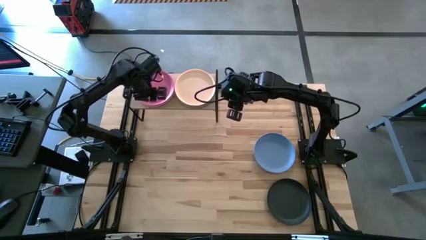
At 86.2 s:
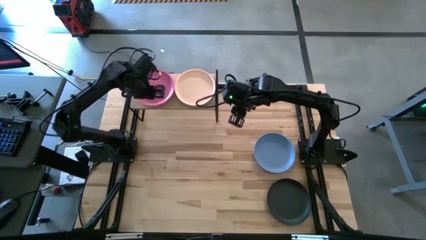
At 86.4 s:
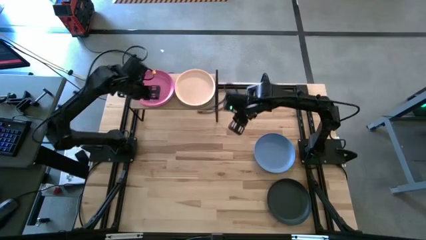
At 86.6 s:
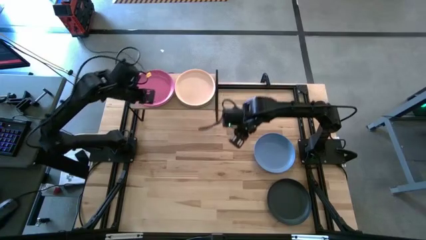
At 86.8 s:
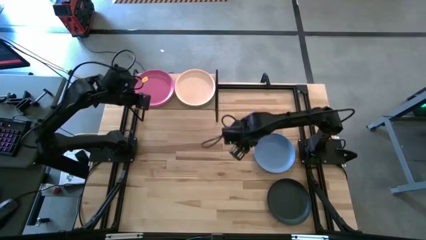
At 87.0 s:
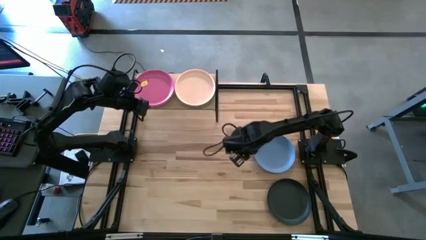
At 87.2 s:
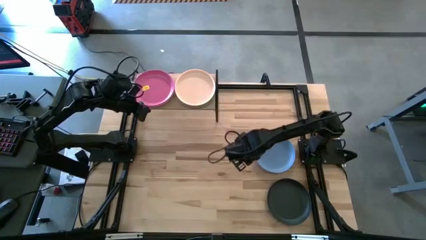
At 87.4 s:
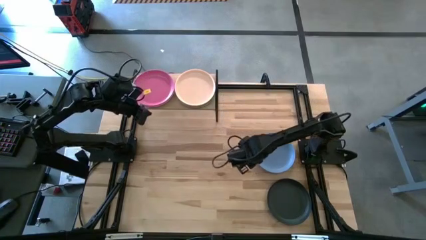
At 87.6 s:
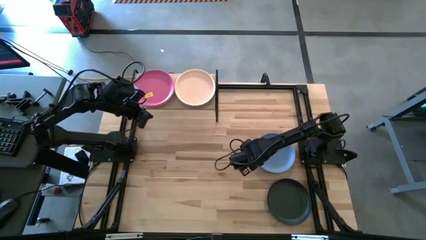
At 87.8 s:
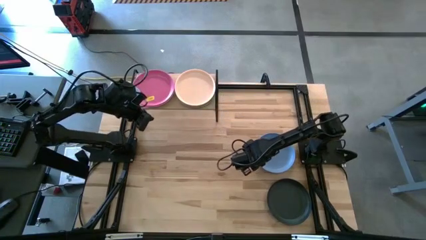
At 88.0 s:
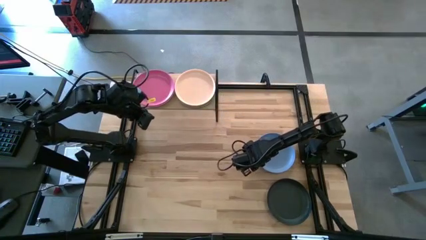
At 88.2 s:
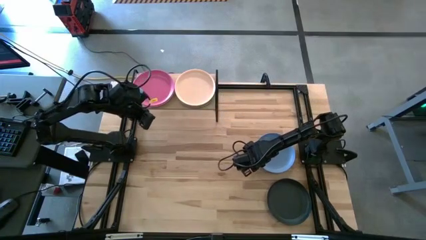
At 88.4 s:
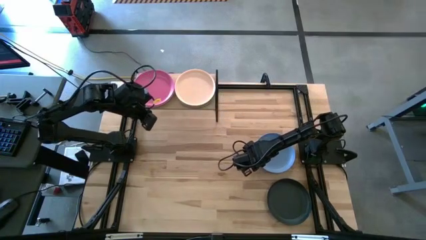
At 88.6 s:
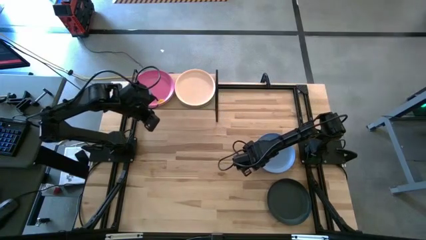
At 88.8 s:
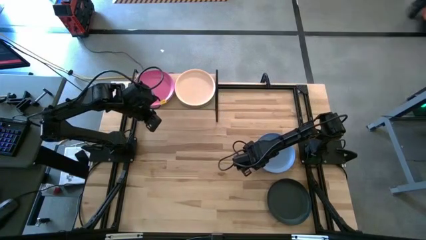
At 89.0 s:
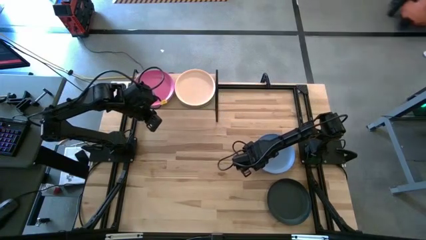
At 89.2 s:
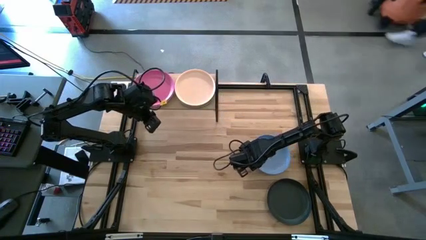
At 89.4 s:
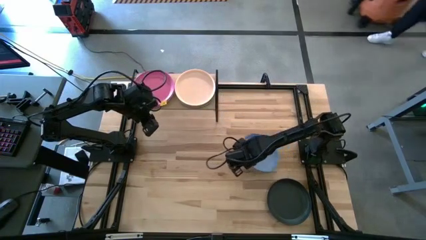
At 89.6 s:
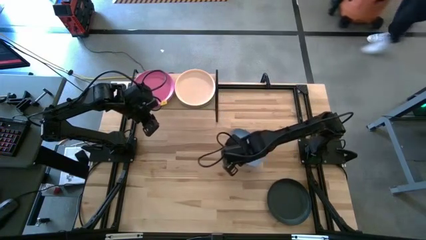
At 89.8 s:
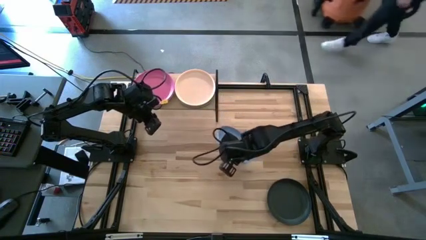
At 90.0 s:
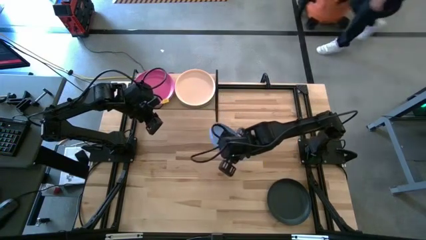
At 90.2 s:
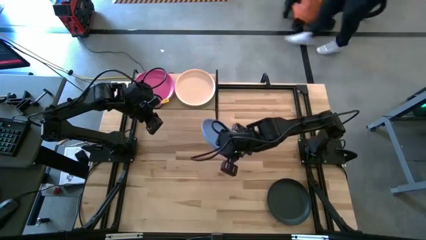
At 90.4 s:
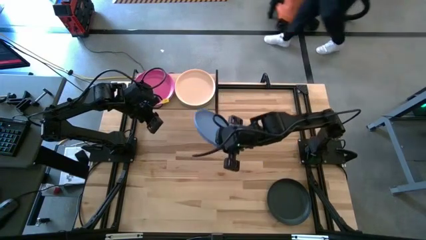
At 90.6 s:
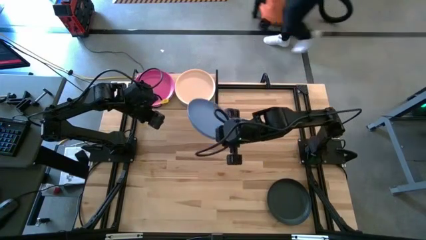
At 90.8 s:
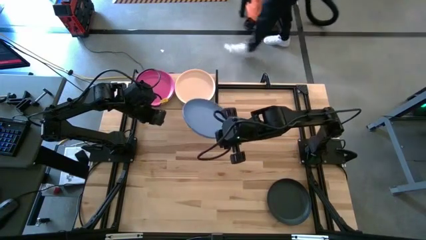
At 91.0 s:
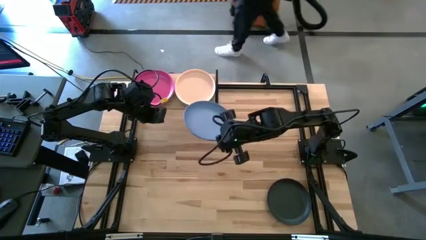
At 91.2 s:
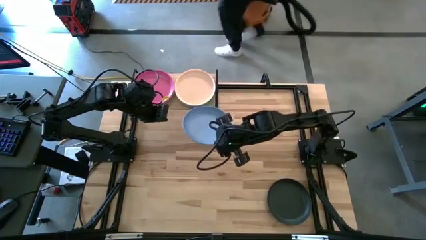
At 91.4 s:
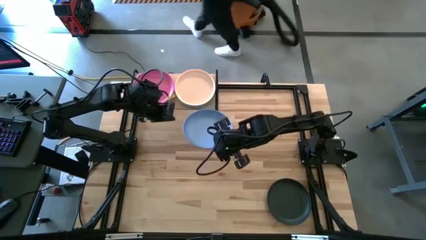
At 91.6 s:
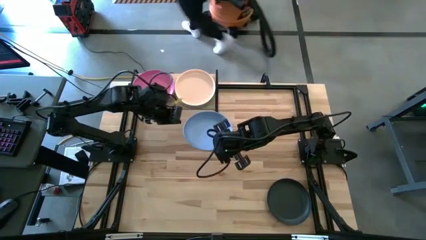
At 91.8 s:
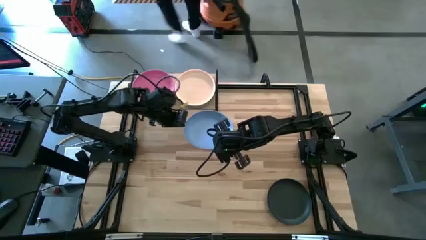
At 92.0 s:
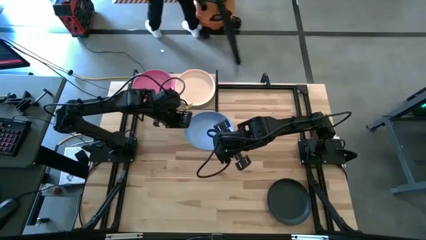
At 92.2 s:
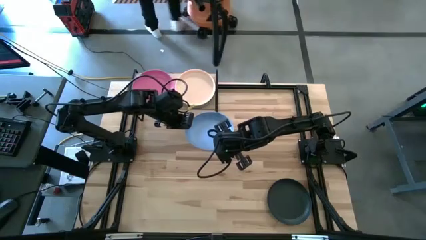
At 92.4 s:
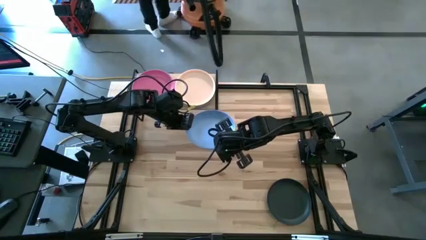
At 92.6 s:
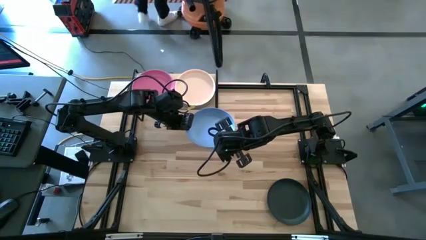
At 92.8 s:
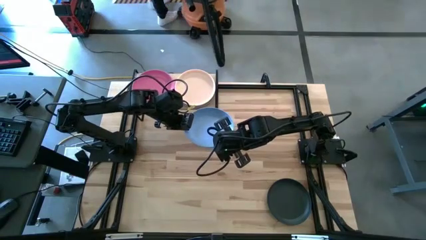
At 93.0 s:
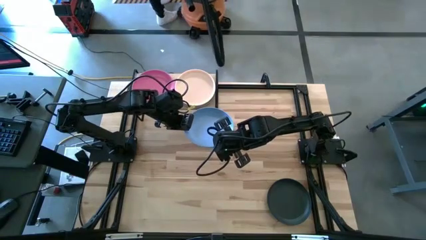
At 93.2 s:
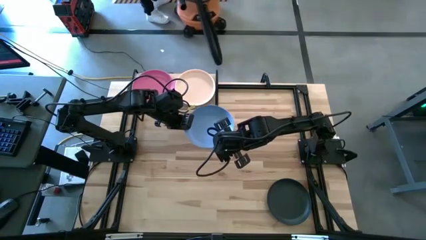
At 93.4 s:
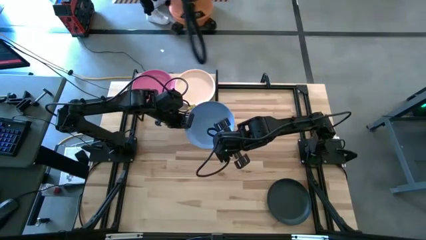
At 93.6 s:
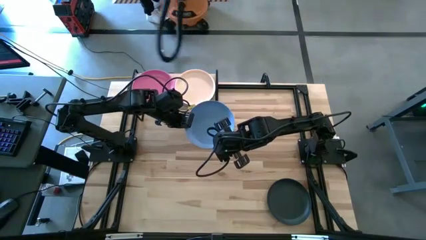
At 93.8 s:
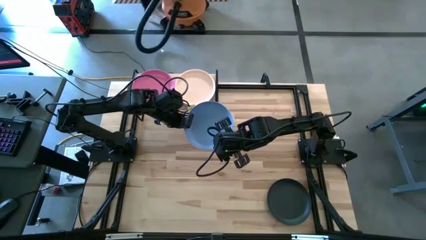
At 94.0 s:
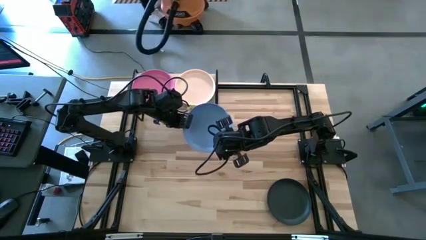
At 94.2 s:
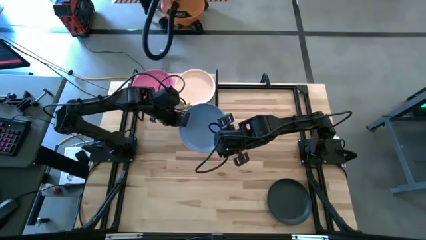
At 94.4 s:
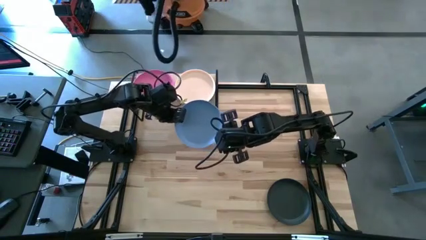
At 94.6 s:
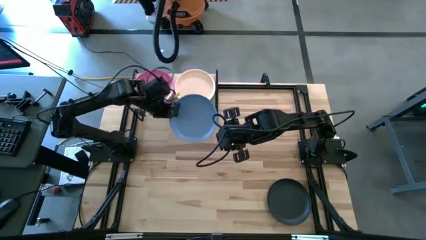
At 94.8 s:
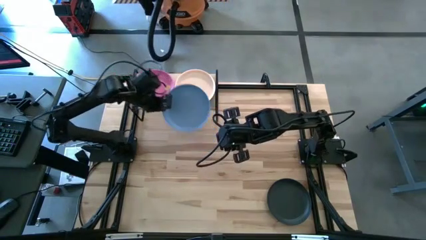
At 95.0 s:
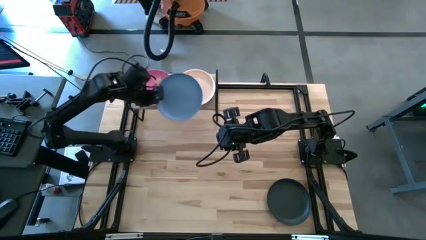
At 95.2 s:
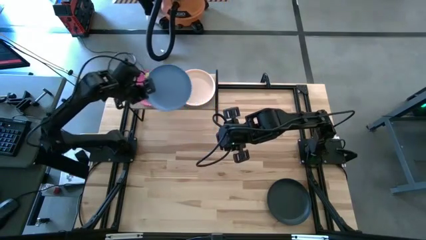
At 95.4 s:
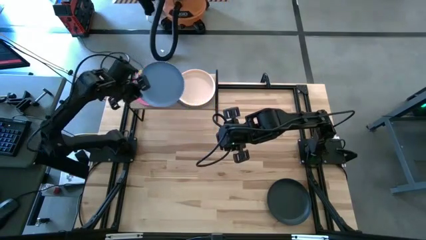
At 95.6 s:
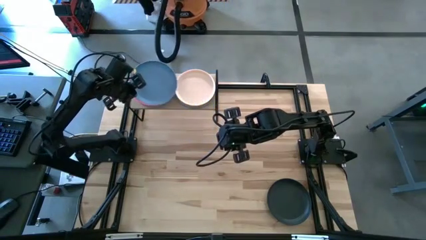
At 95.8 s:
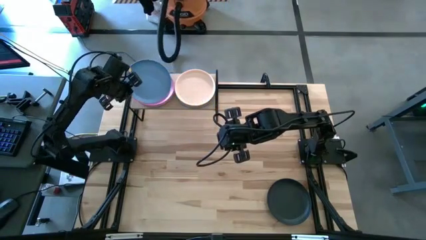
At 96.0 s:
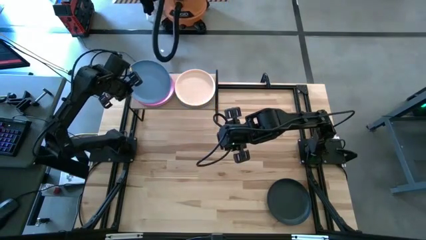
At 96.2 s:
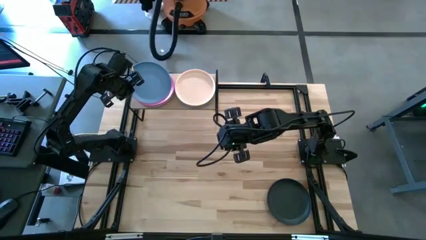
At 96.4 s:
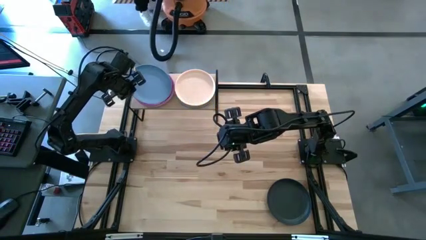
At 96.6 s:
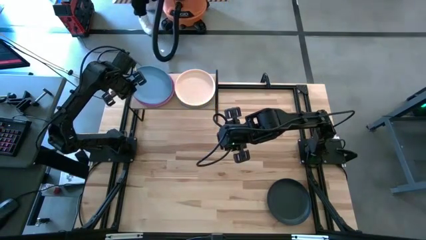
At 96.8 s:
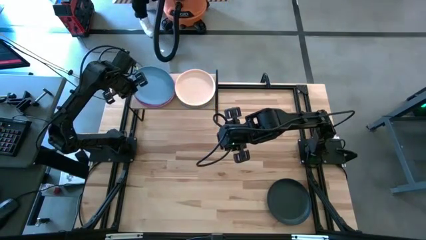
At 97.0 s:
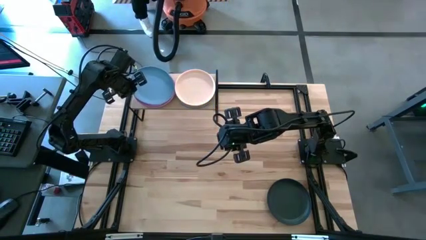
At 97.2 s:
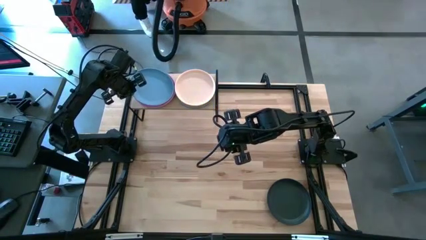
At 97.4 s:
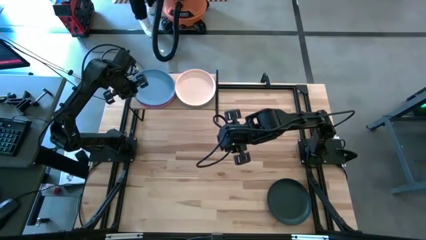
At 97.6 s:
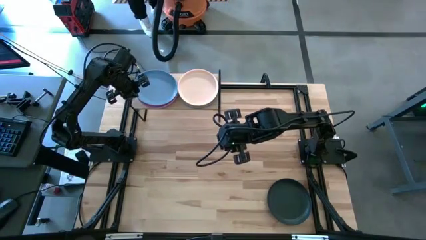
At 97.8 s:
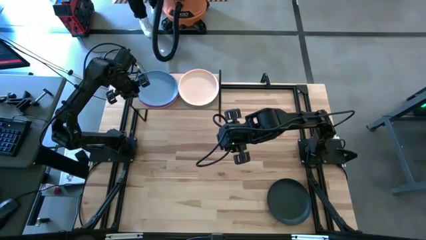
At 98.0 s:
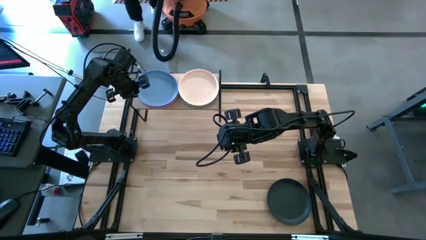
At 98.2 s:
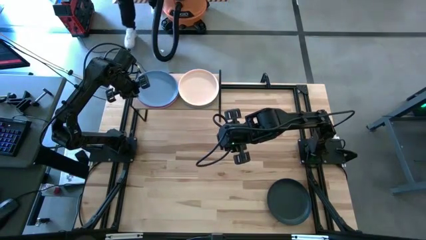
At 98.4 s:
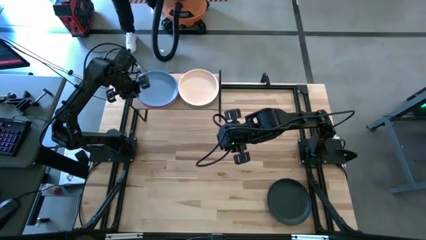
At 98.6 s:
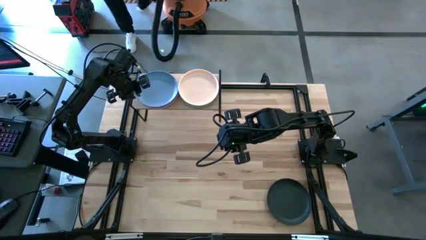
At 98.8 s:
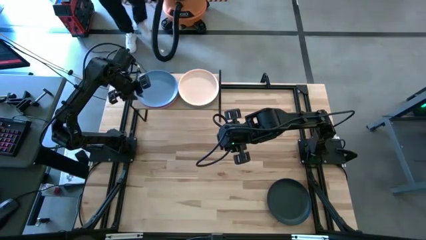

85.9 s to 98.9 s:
Task: Place and stack plates onto a shelf
Stack the blue plate on top of the pink plate on the shelf
